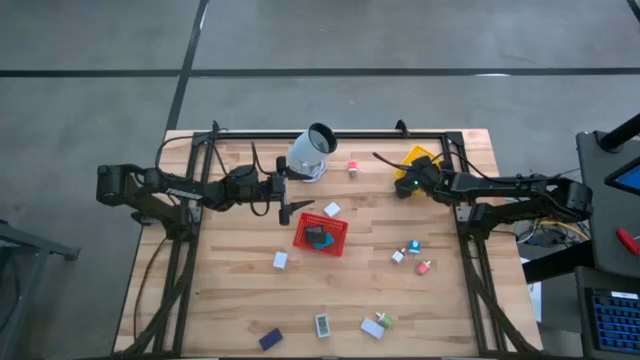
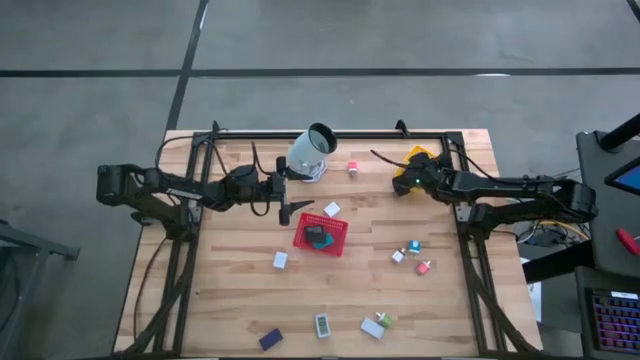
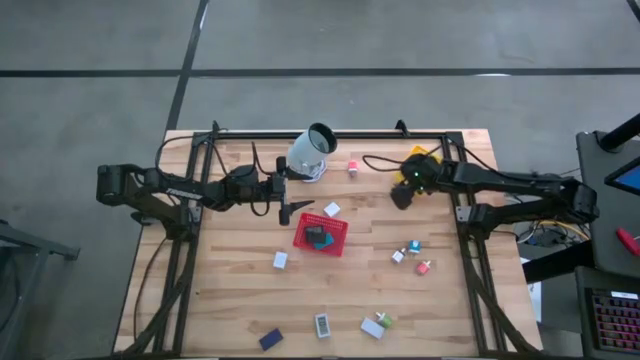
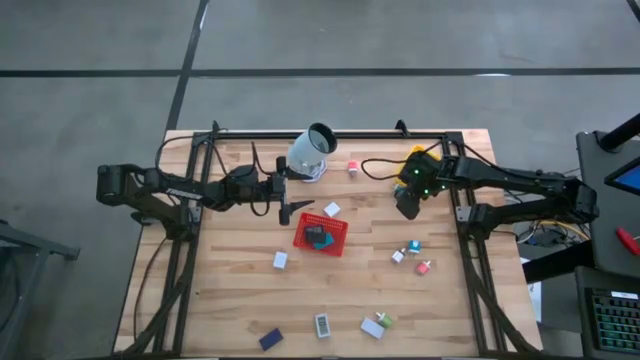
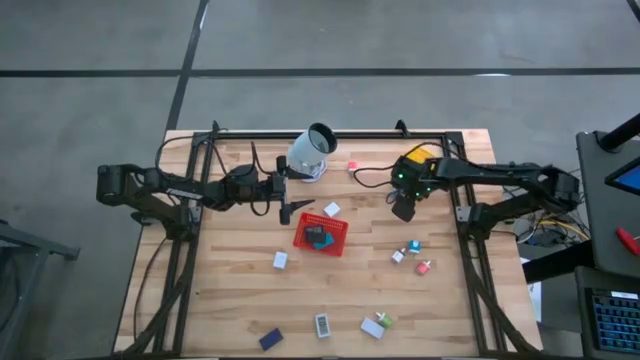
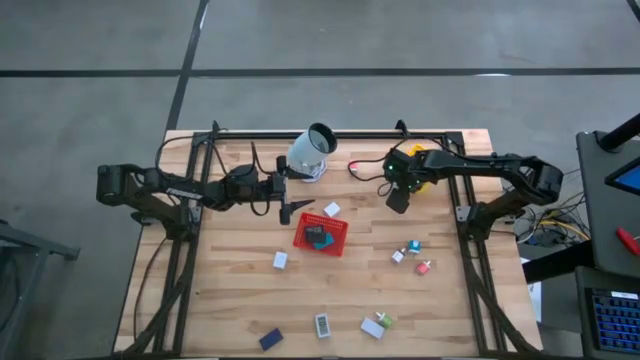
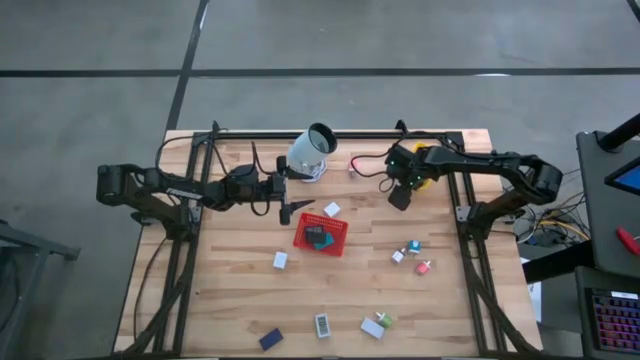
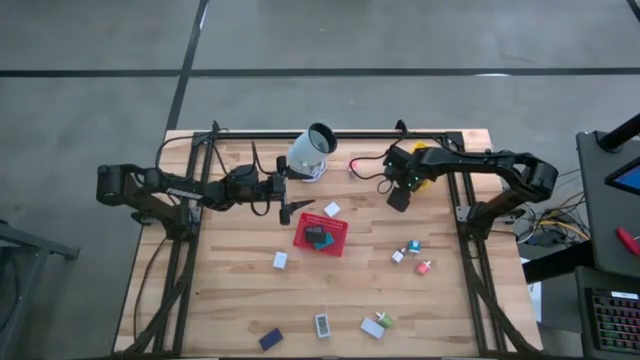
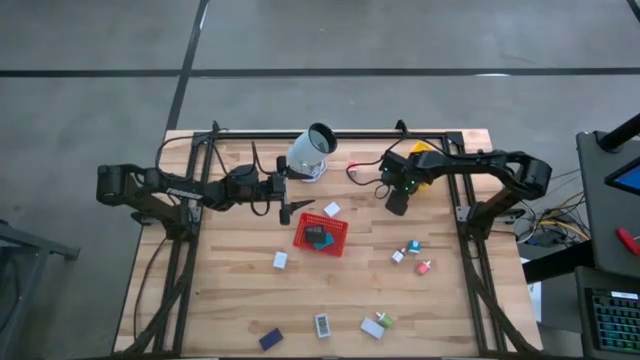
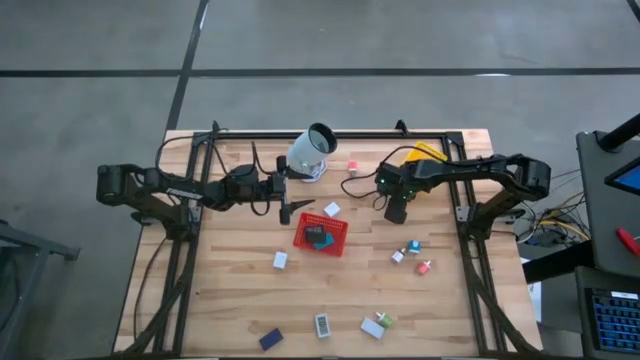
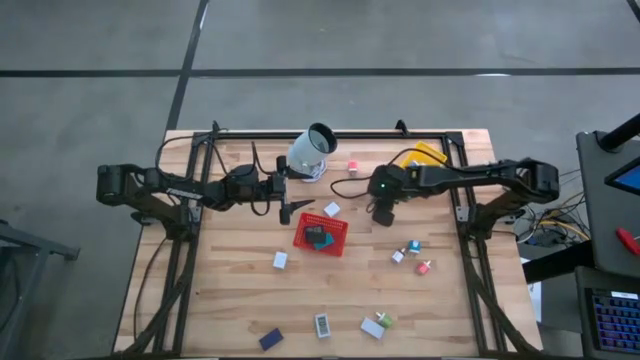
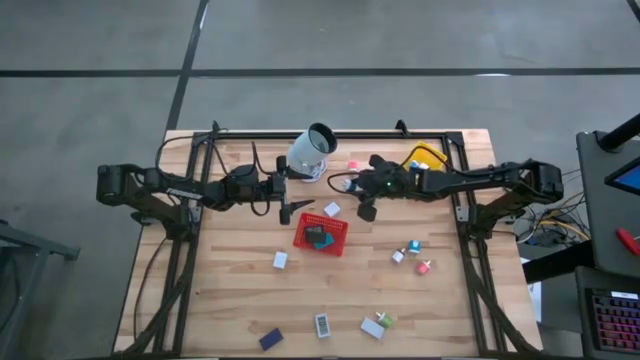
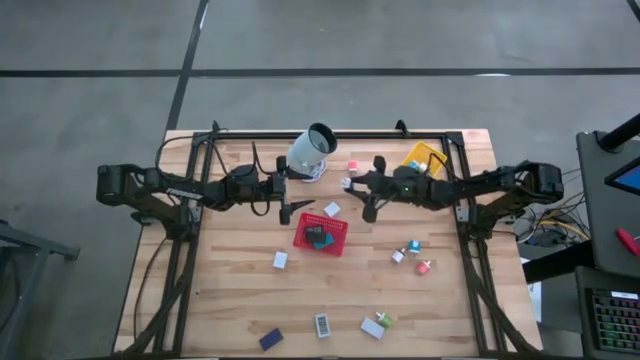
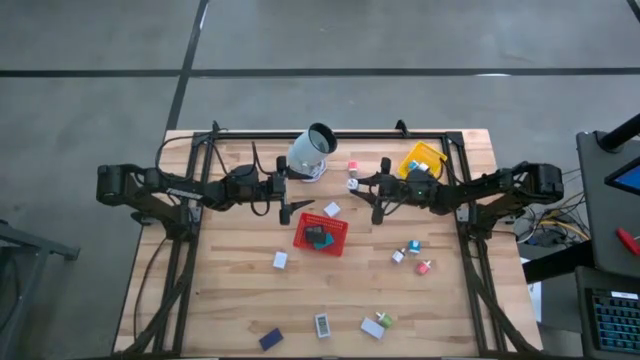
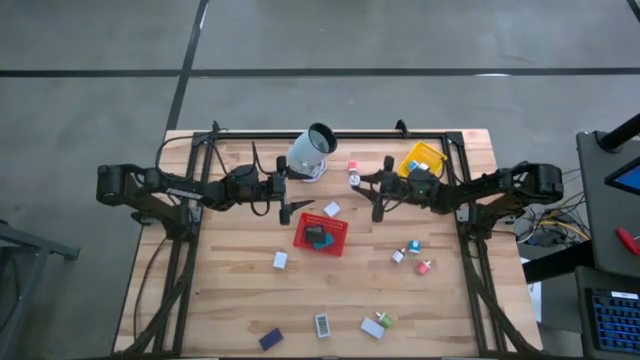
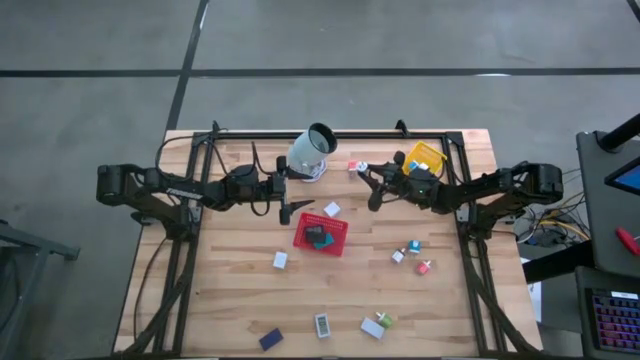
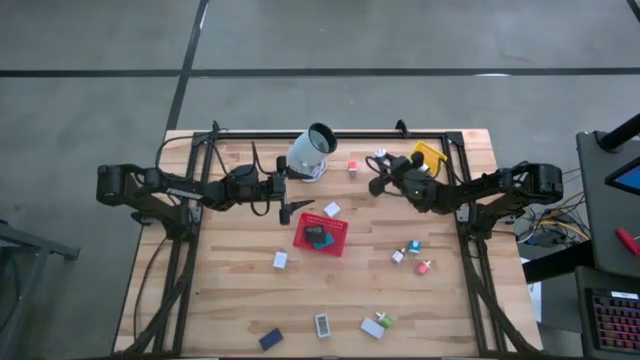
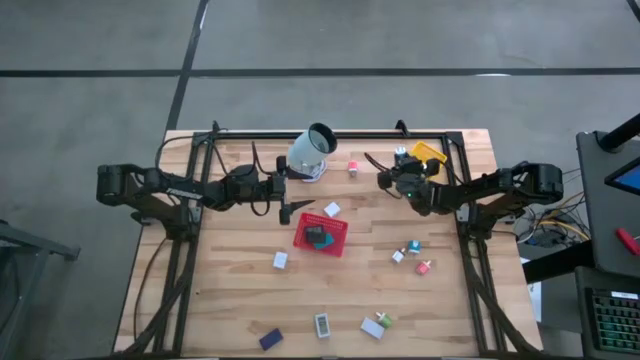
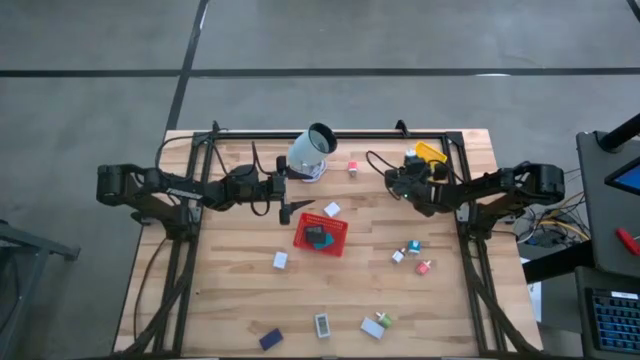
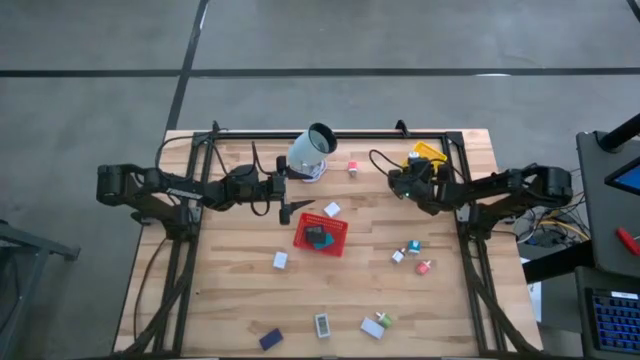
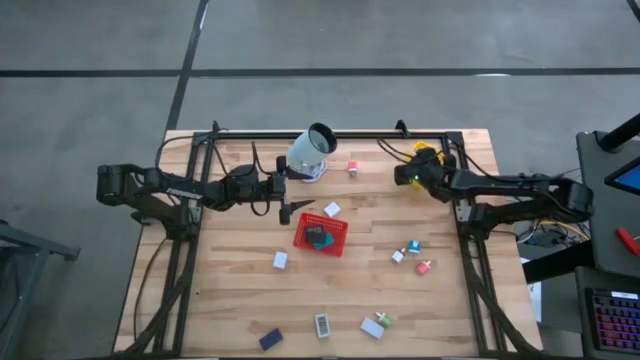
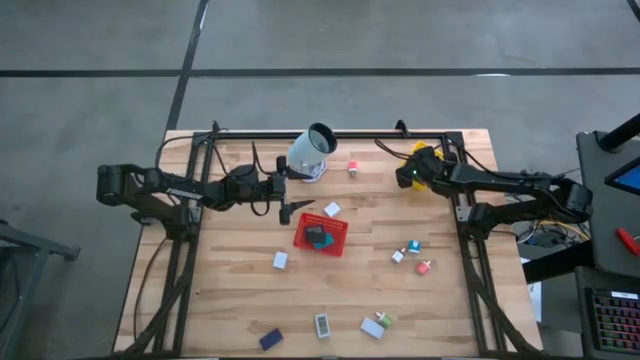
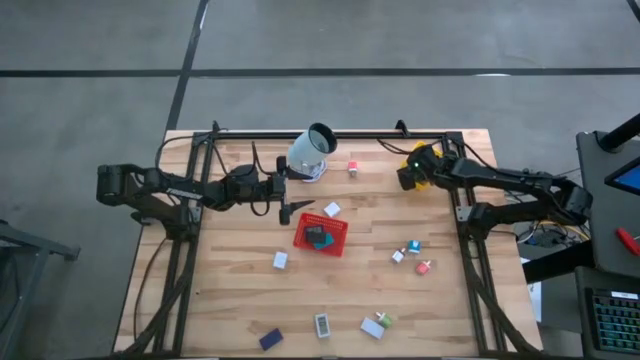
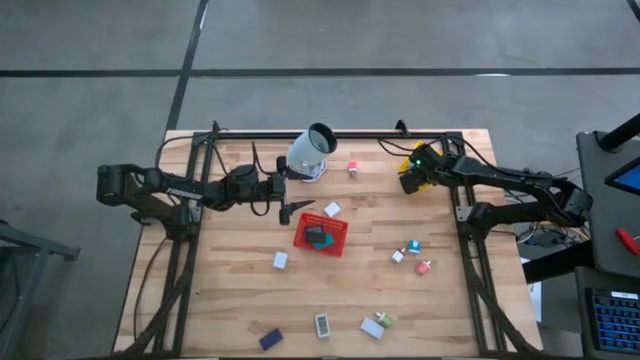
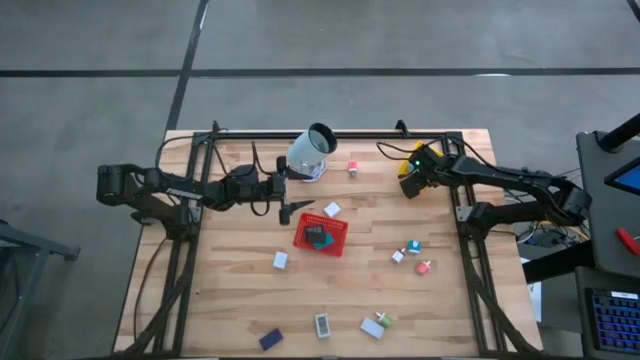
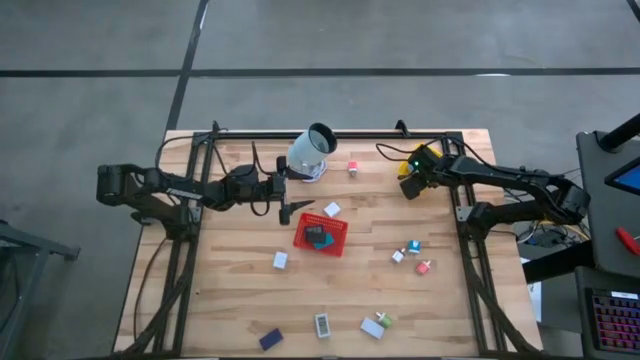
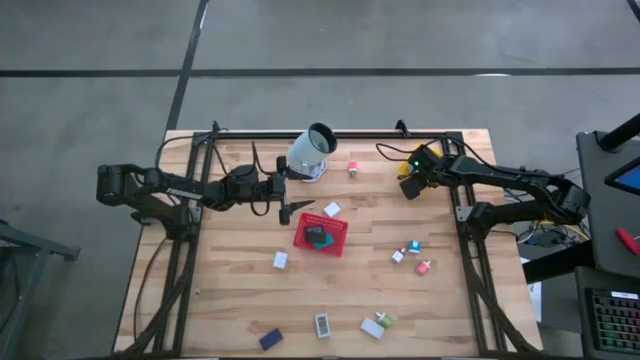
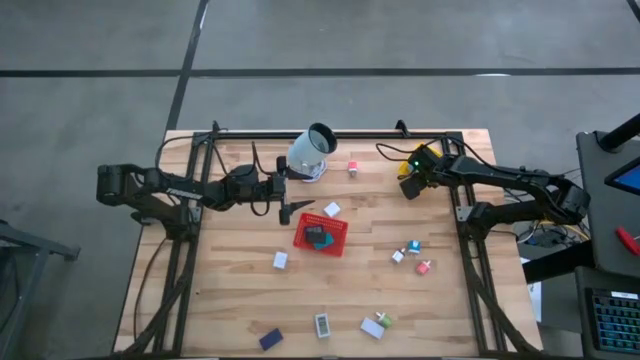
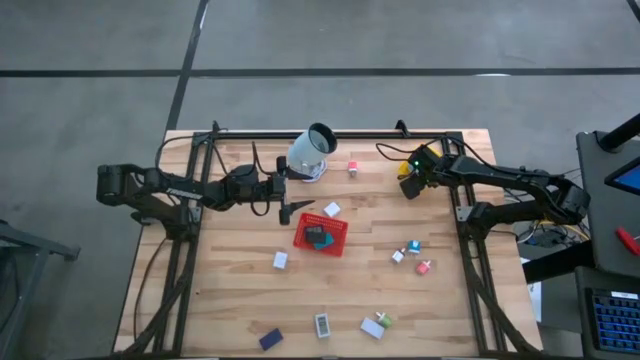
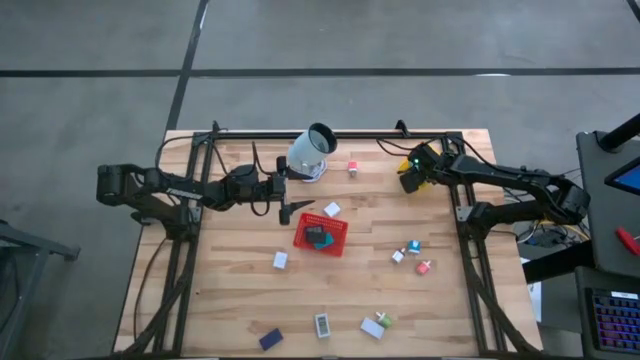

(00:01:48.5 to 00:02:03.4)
Task: Pick & Place Office items
Put the top blue charger adapter into the yellow basket

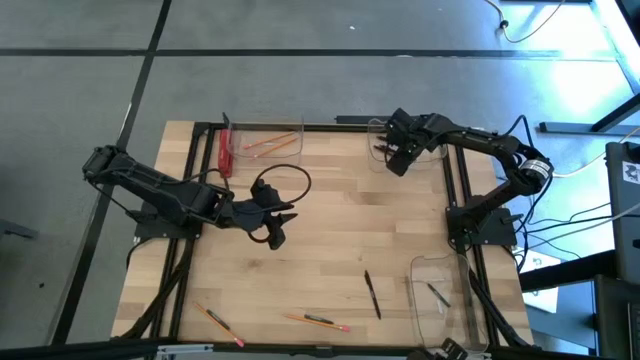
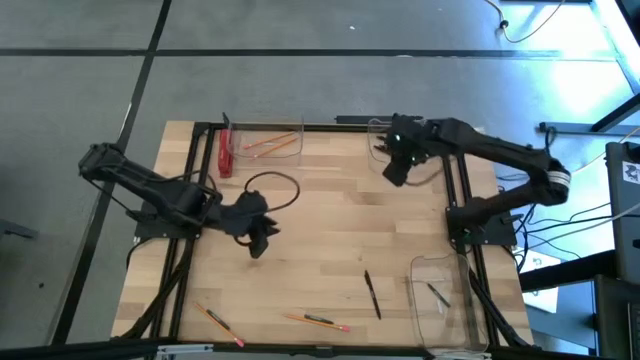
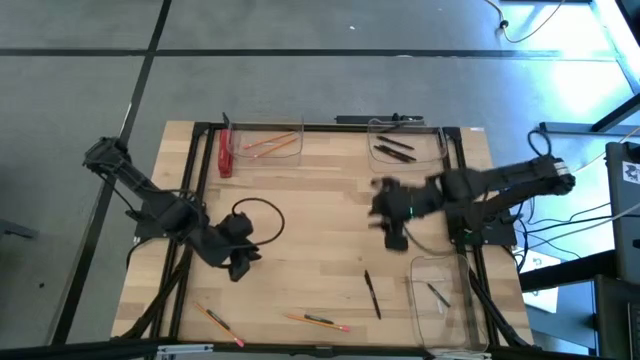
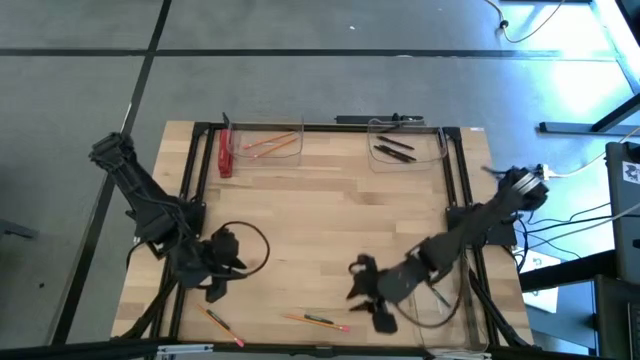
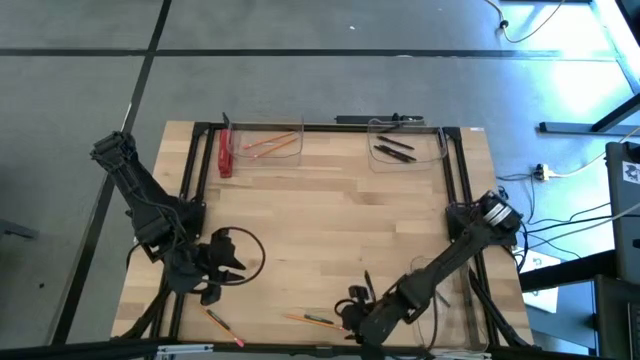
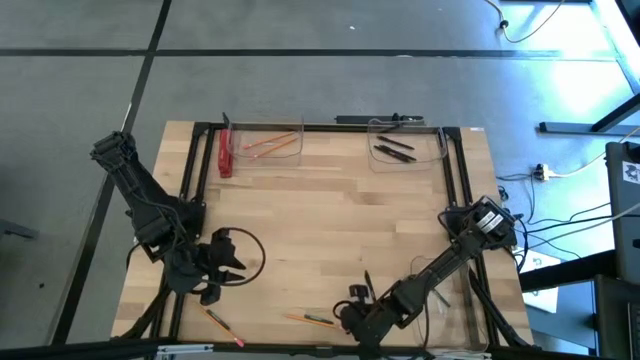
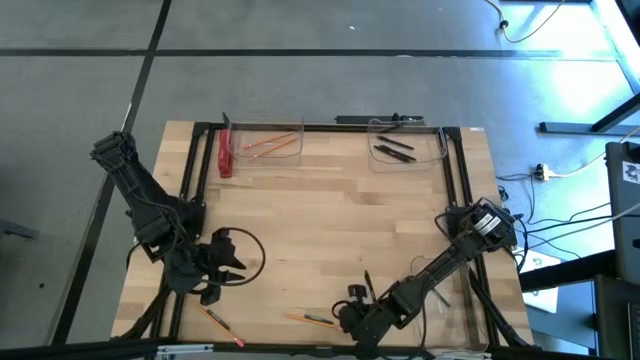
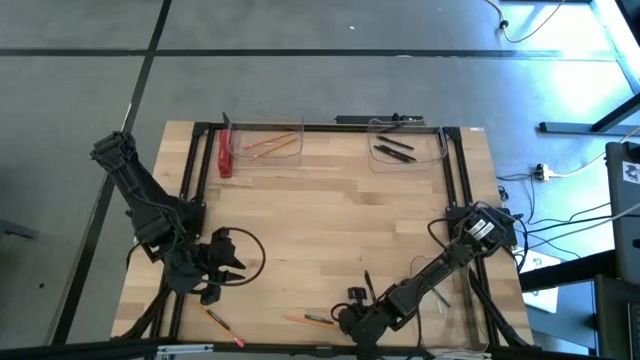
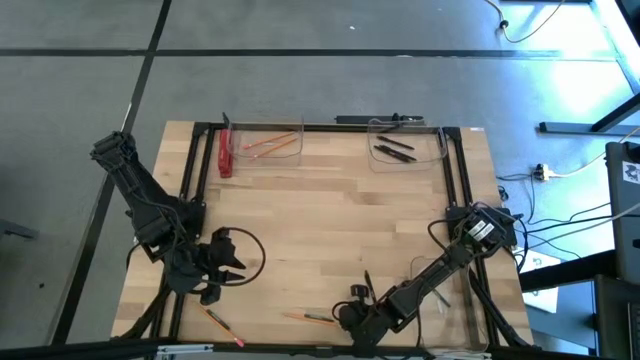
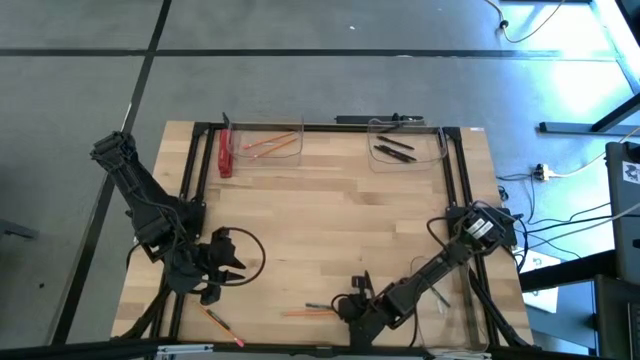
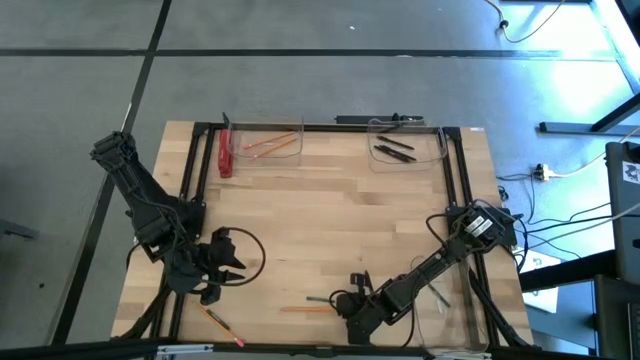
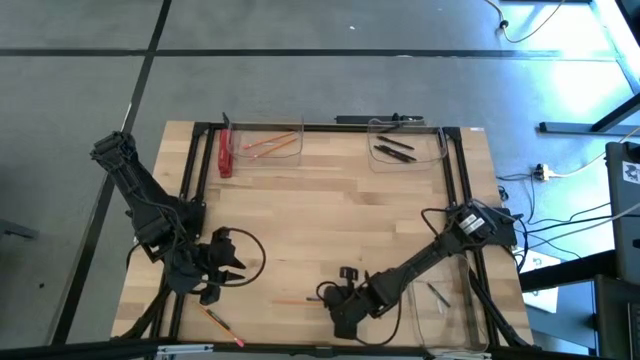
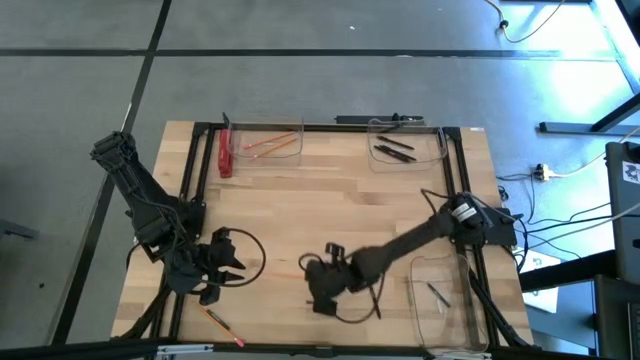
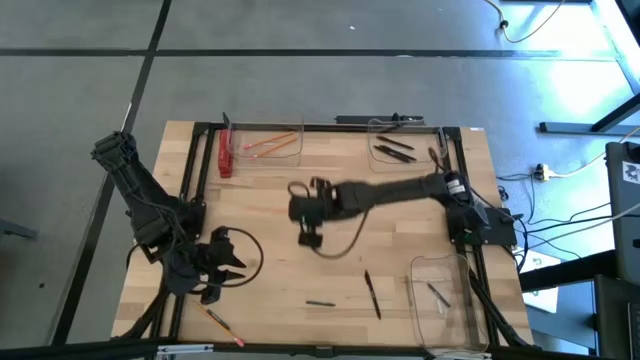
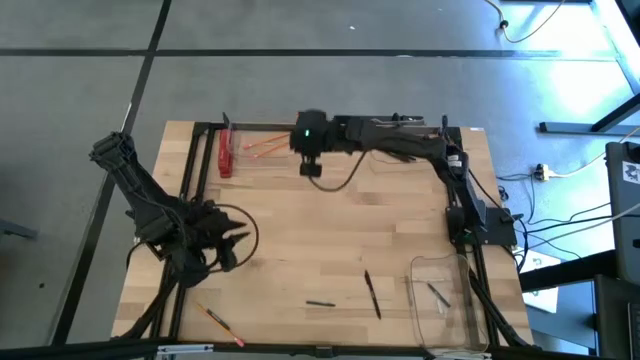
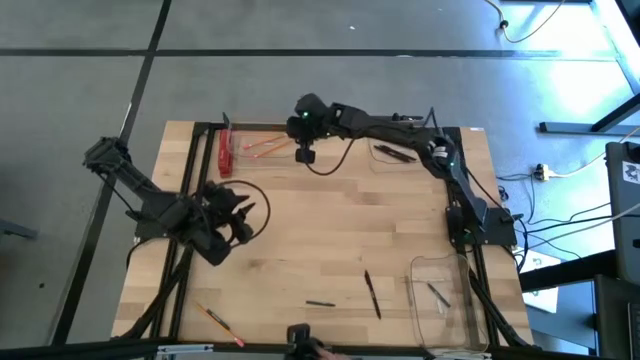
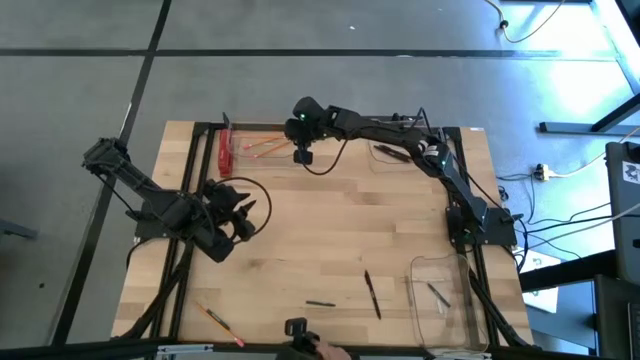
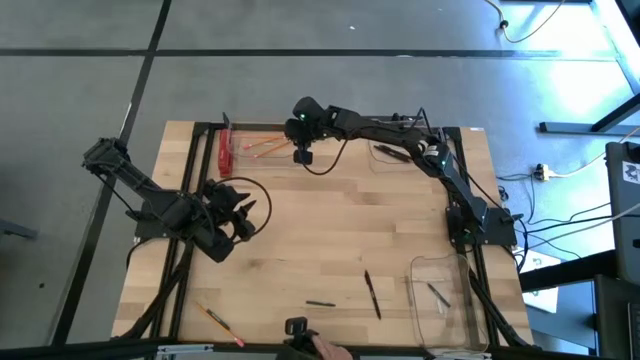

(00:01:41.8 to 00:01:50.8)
Task: Sort crayons/erasers/pens/pencils in bins
Put the bottom right yellow pencil into the top left transparent bin
